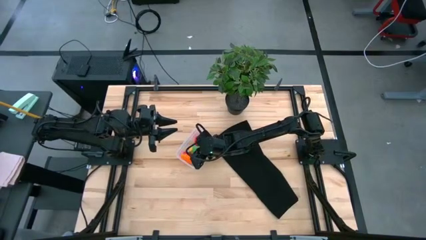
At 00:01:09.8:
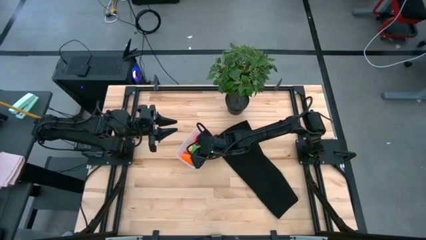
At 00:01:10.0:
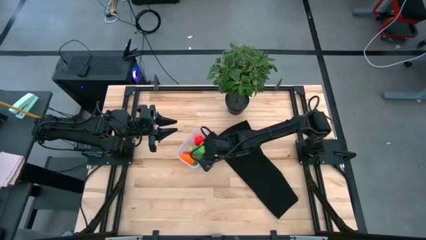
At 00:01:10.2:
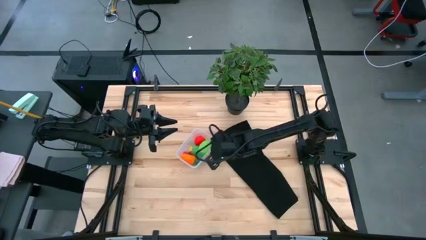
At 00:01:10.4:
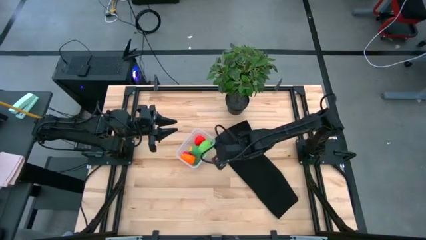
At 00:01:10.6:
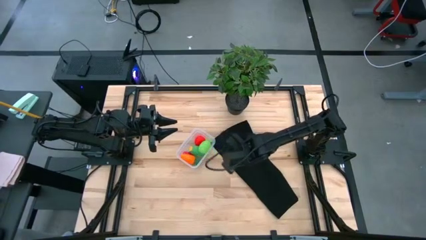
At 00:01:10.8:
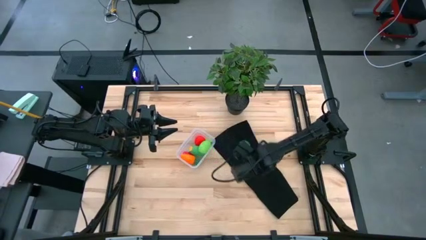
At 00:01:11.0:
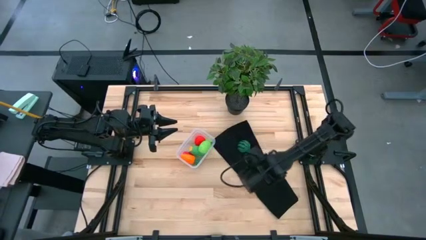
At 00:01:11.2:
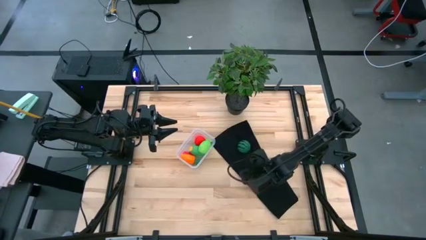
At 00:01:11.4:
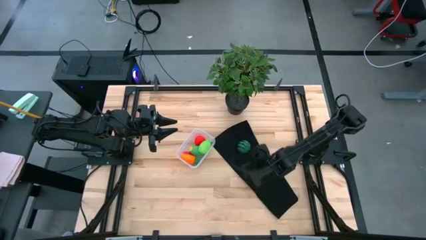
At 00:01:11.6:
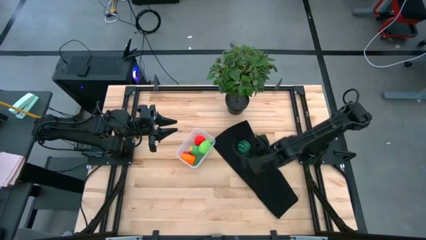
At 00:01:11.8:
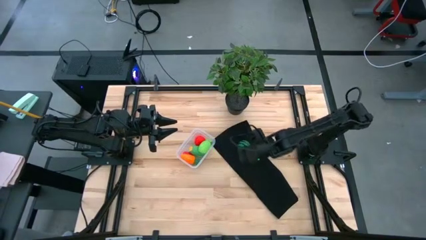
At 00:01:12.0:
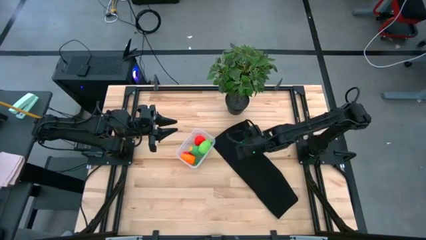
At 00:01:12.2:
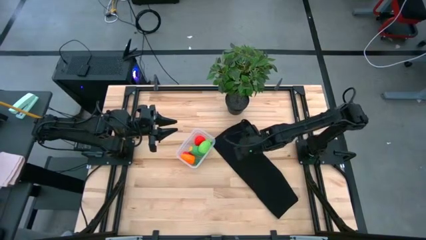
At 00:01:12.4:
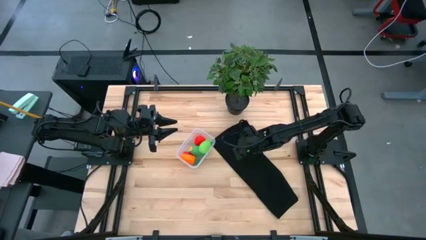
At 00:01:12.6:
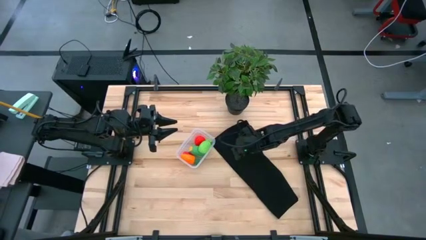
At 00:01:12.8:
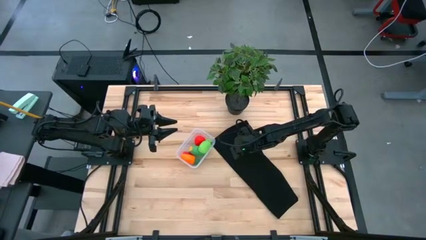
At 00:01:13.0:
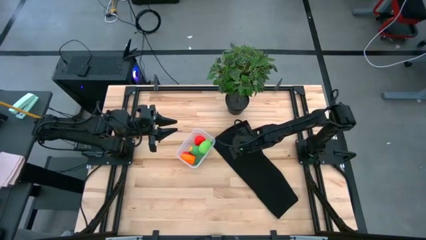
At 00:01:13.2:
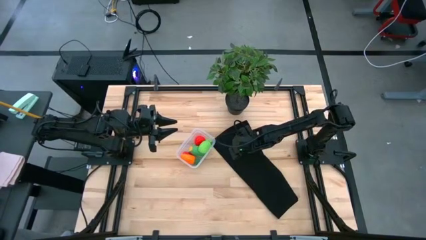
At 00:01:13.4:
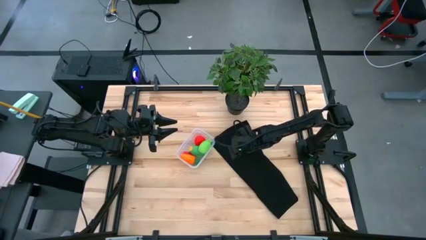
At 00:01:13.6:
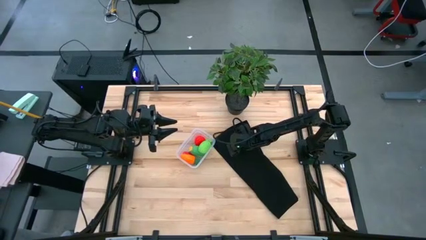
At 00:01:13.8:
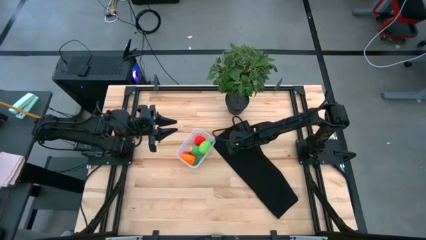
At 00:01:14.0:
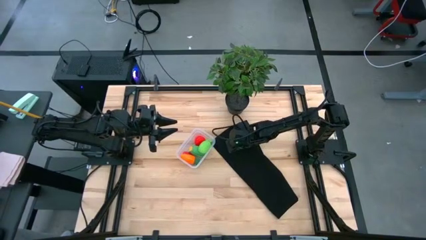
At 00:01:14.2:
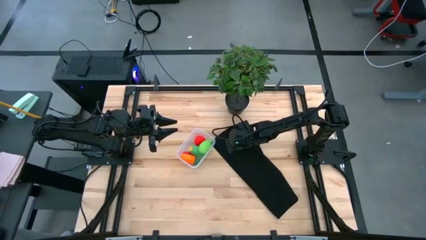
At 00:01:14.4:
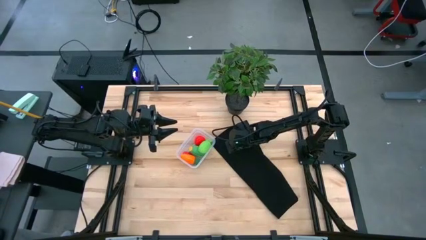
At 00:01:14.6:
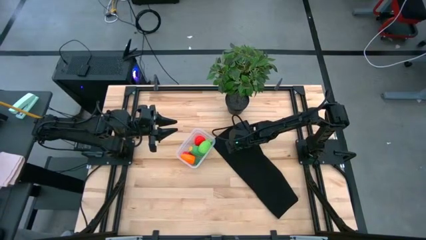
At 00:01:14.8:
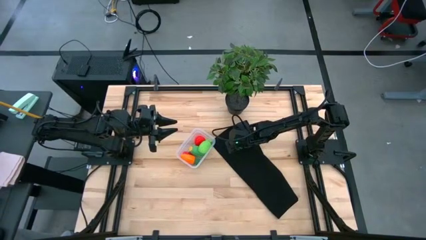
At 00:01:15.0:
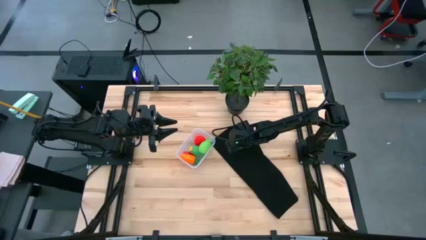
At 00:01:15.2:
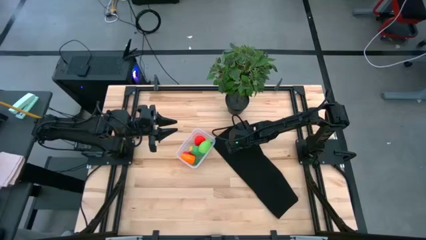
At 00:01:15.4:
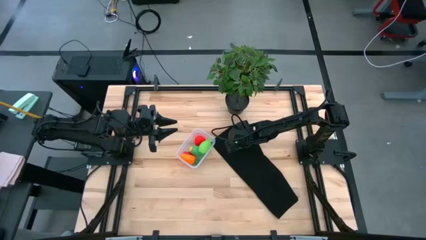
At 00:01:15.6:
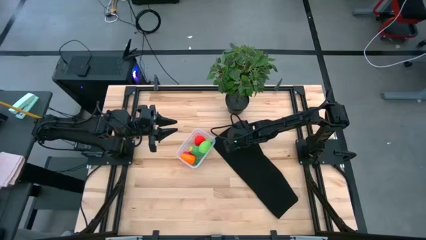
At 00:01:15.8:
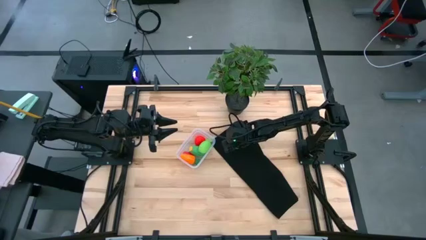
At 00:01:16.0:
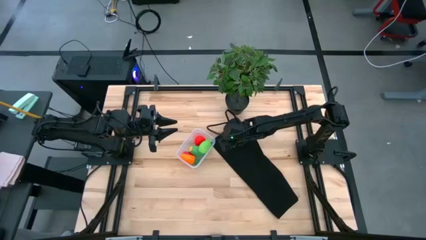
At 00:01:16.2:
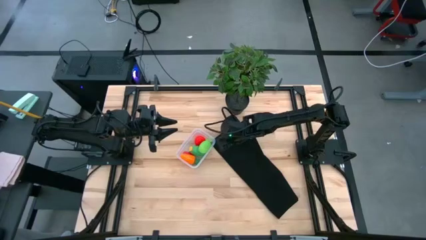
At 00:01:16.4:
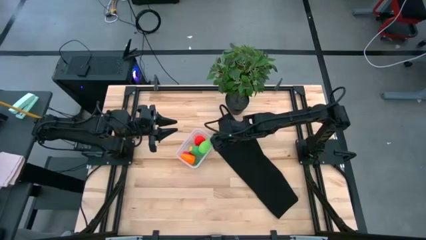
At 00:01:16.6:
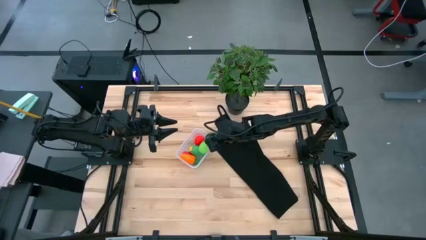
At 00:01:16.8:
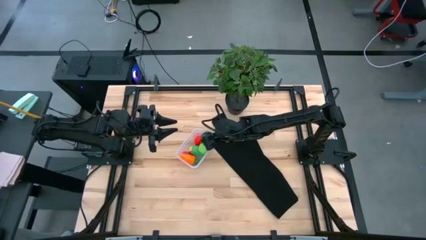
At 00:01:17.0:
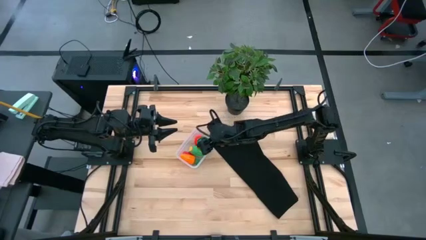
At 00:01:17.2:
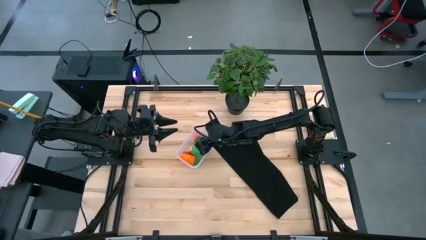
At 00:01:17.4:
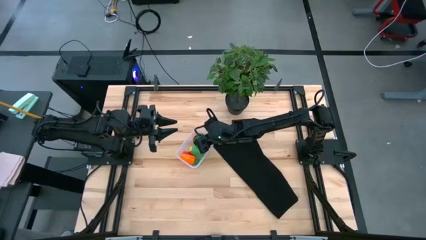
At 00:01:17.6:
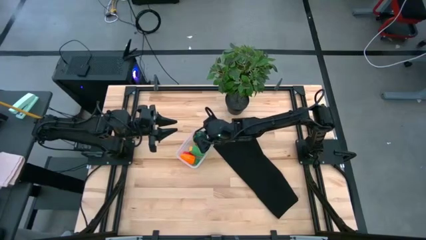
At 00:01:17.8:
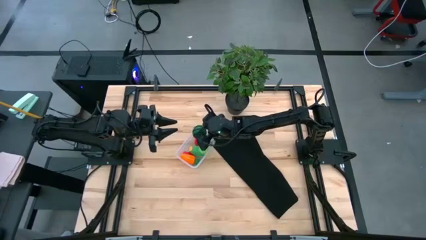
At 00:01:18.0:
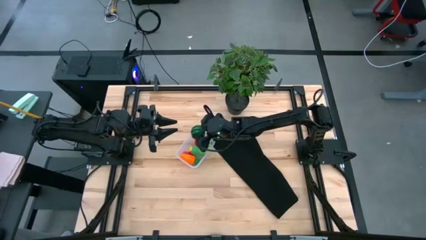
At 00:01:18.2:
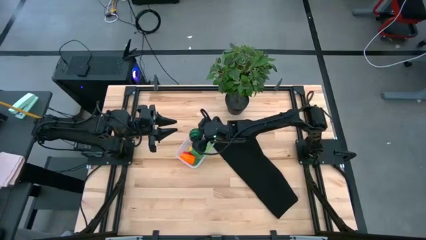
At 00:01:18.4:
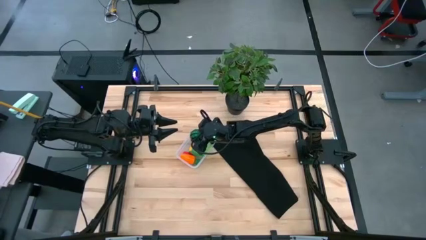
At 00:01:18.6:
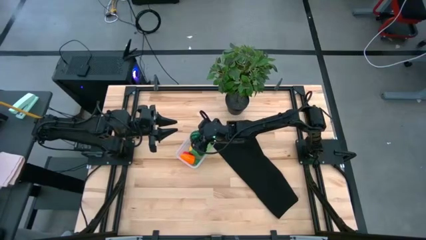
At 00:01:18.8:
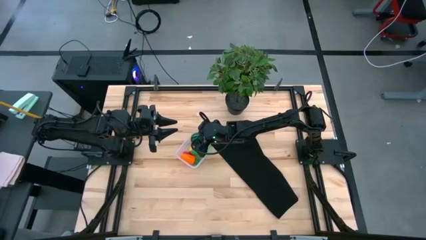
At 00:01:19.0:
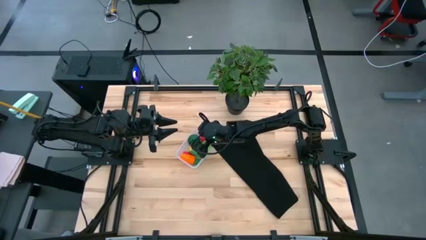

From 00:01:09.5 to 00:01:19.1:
Task: Pick and placing Produce into tupperware
Put the green watermelon into the transparent bin

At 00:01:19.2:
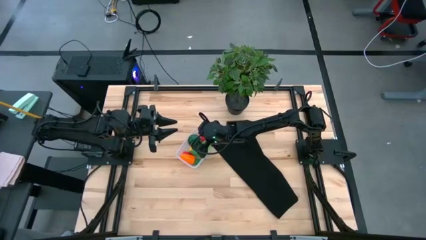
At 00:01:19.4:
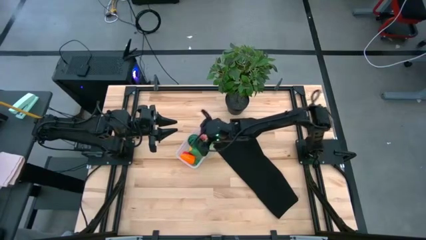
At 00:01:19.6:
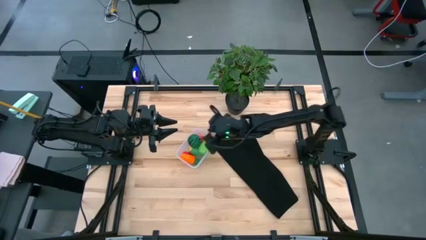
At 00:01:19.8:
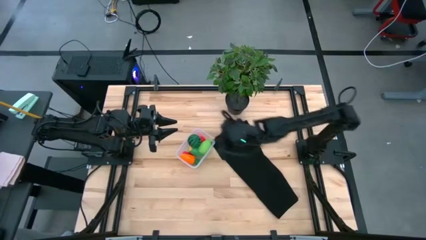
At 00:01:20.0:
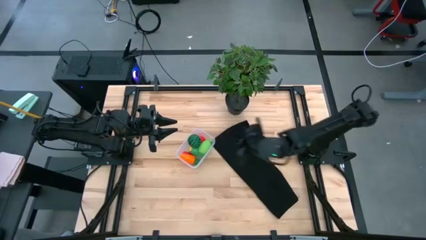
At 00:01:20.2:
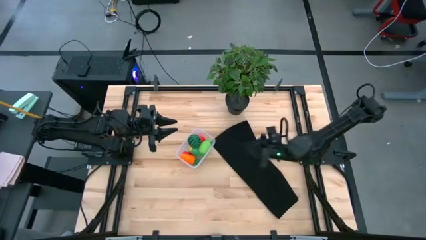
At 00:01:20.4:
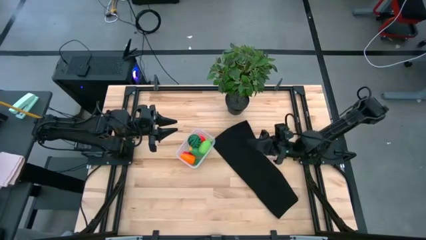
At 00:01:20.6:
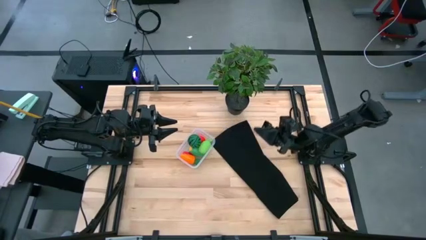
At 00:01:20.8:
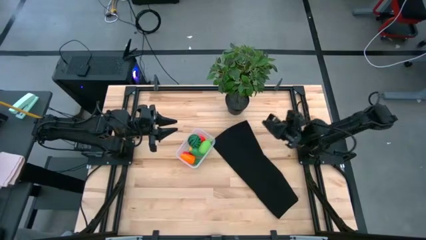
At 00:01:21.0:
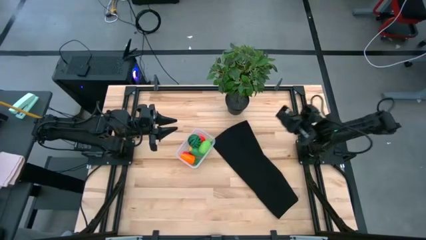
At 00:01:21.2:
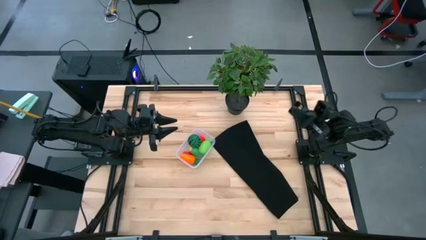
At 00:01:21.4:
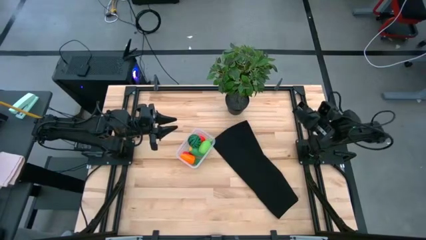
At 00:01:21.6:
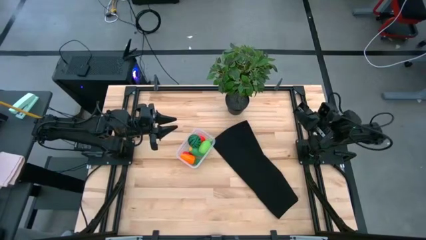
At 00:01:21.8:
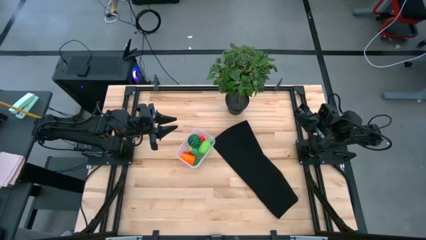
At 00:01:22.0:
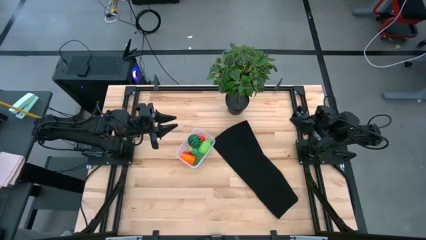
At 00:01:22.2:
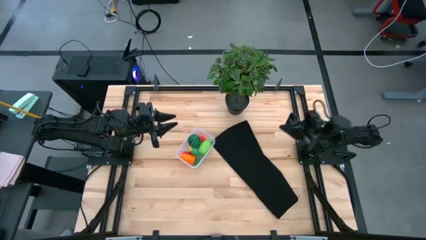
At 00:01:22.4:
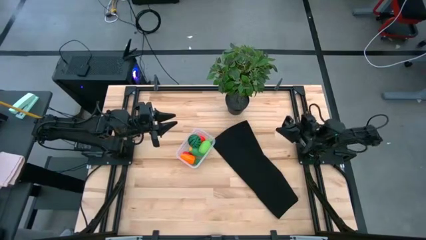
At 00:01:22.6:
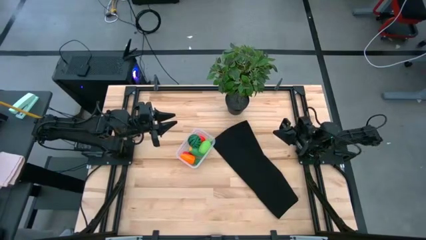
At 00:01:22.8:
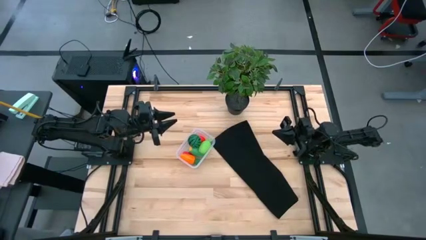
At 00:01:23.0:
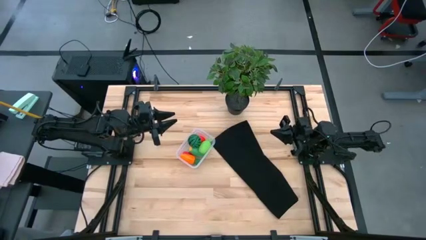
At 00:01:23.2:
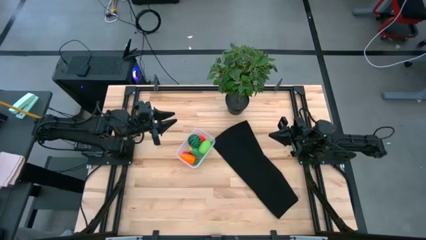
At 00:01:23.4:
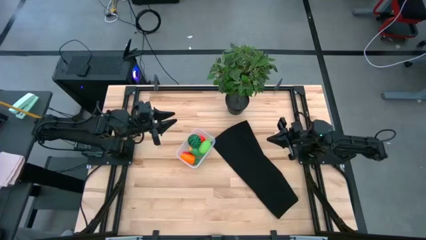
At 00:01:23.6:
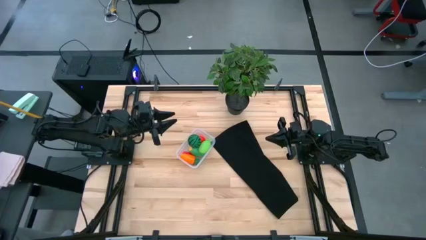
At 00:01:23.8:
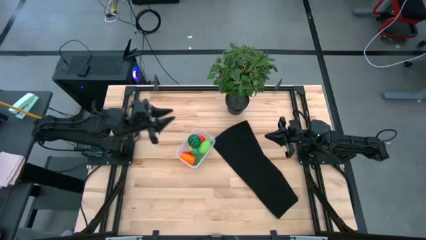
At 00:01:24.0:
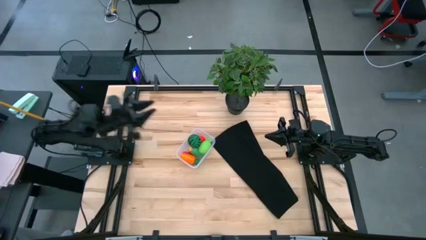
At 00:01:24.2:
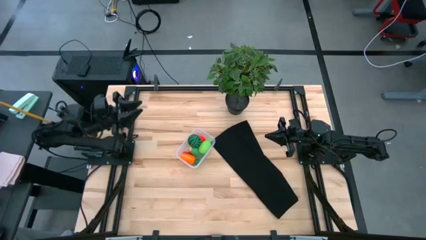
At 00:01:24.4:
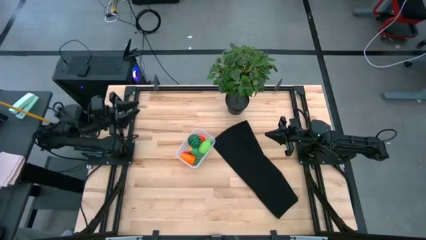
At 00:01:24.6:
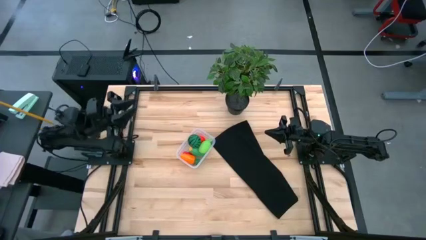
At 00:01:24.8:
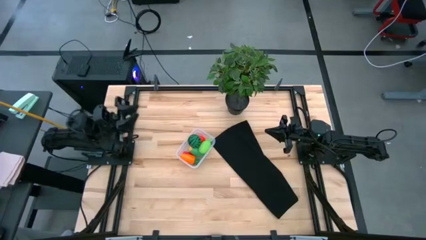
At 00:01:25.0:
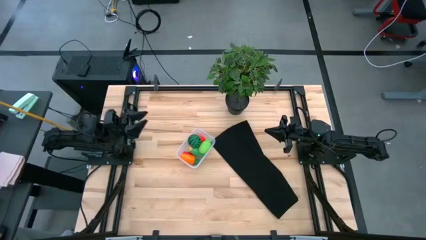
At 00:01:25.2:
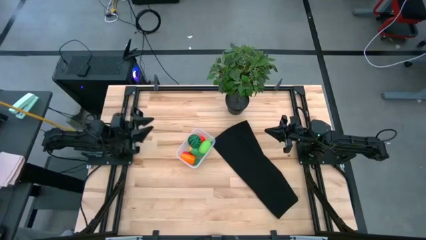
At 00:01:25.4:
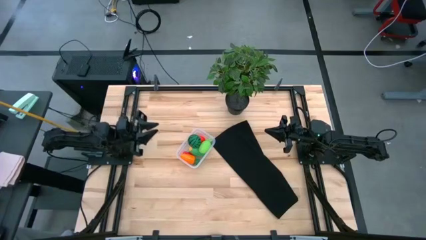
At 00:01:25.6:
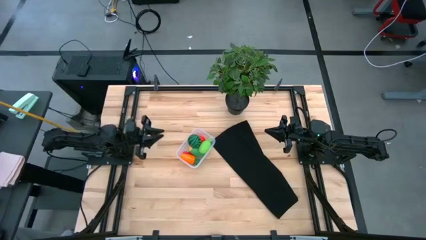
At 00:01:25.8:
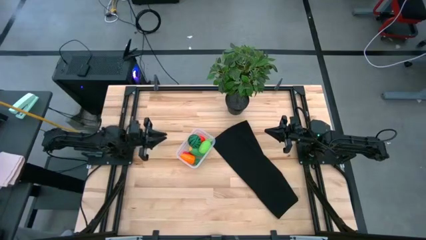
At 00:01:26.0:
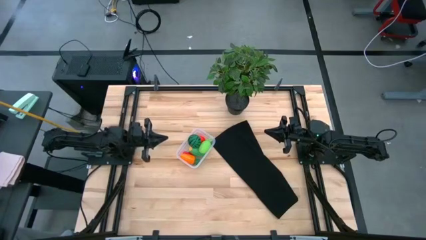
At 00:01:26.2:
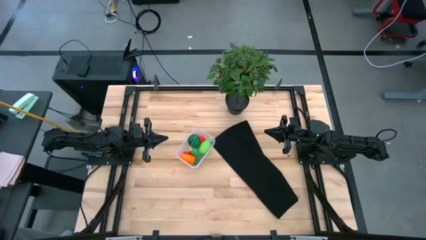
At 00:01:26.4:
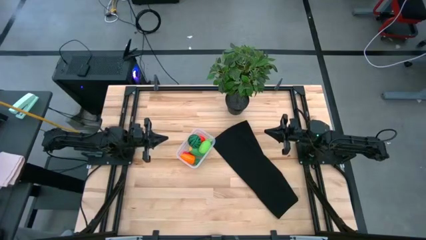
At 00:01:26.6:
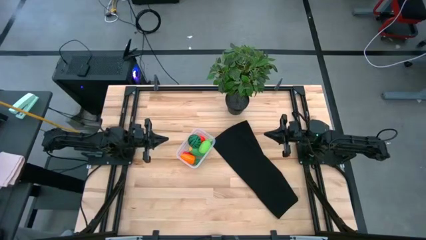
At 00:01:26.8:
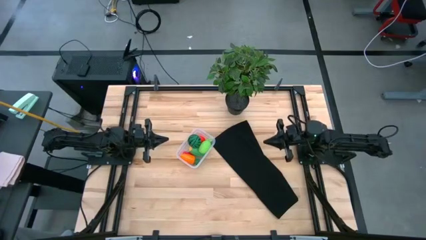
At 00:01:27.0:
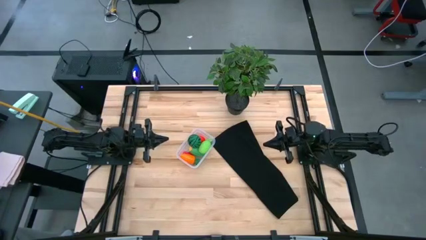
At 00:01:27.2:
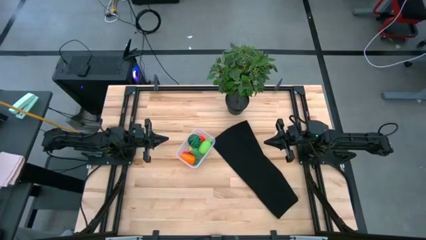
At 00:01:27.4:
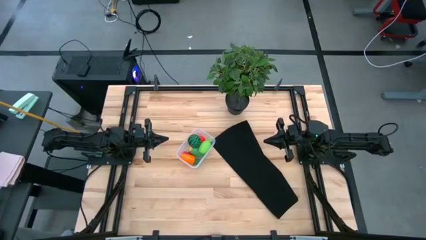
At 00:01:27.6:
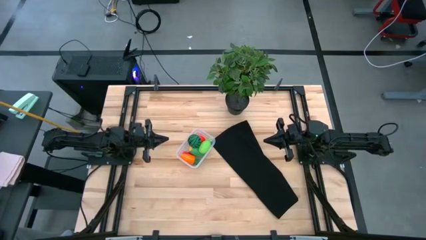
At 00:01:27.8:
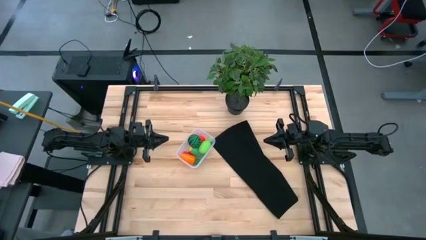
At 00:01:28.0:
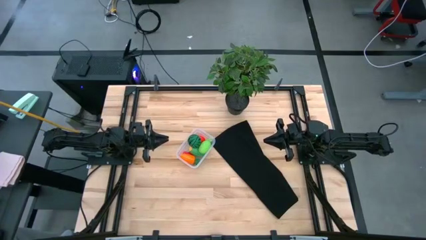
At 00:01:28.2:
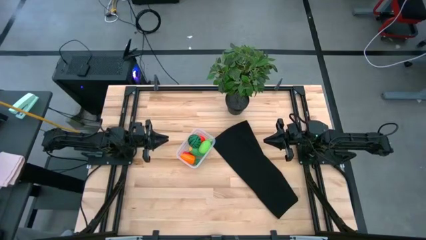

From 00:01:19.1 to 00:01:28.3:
Return to Home Position
